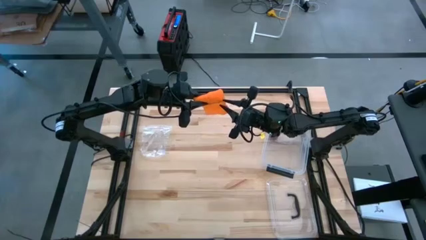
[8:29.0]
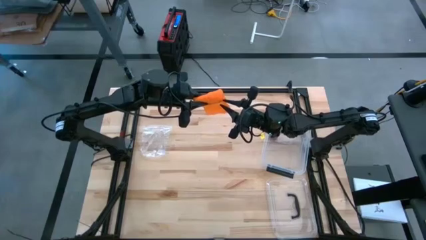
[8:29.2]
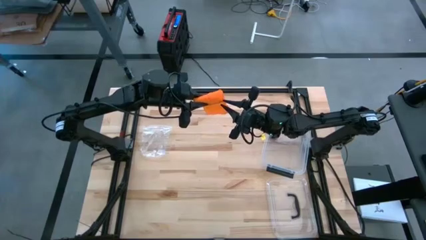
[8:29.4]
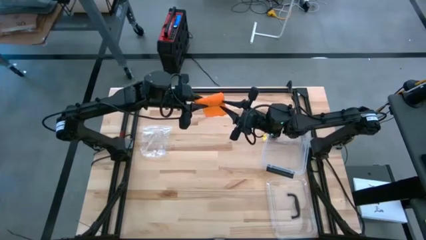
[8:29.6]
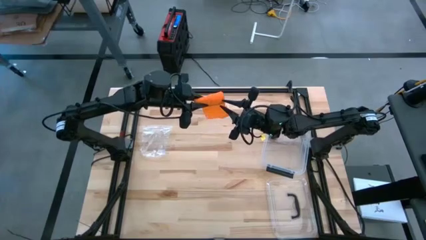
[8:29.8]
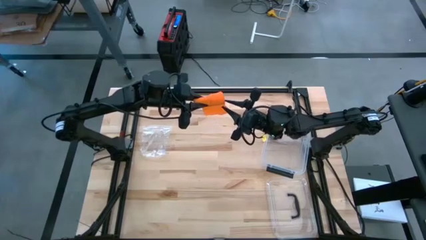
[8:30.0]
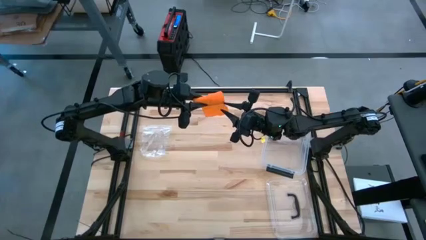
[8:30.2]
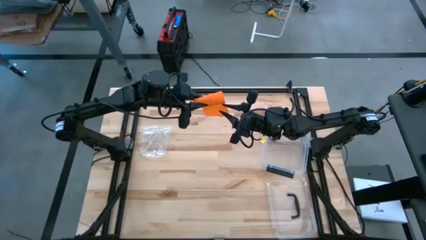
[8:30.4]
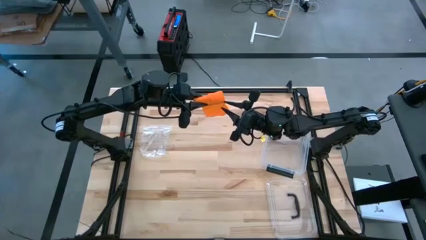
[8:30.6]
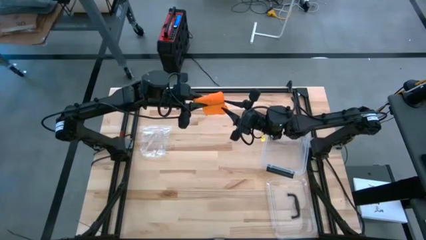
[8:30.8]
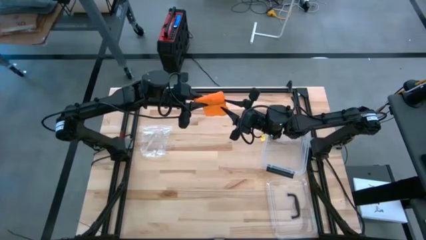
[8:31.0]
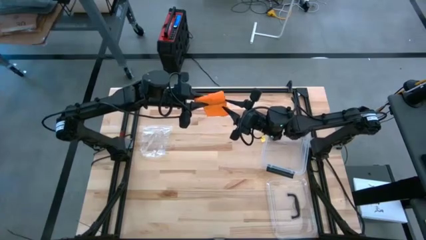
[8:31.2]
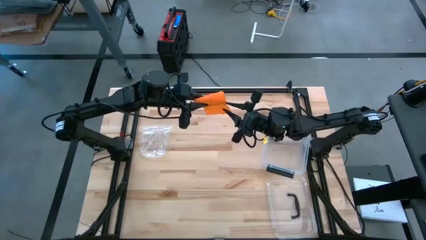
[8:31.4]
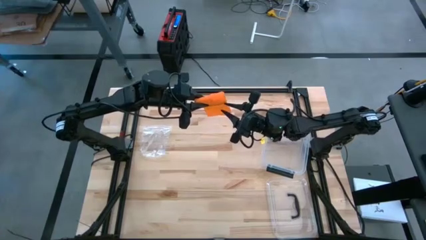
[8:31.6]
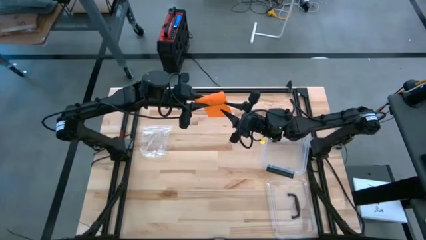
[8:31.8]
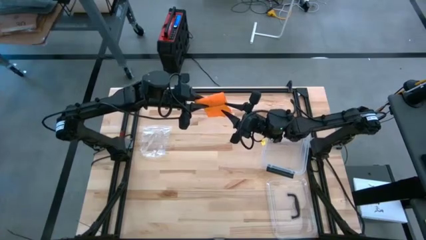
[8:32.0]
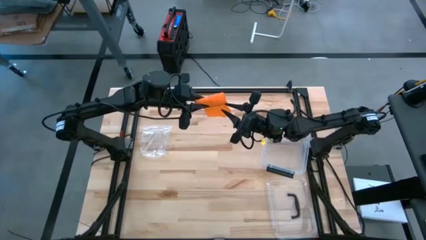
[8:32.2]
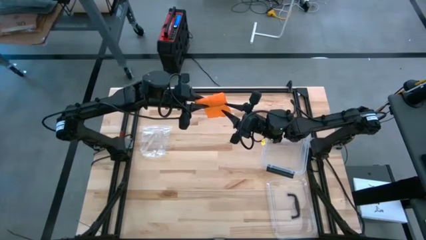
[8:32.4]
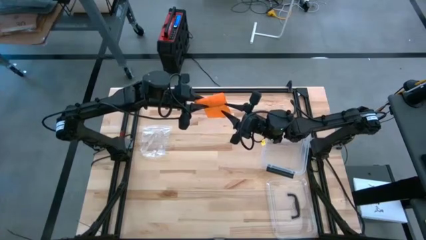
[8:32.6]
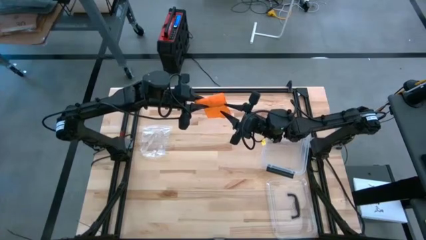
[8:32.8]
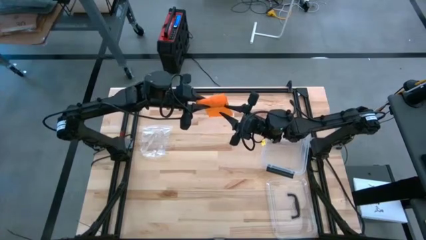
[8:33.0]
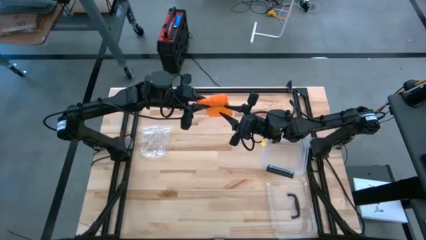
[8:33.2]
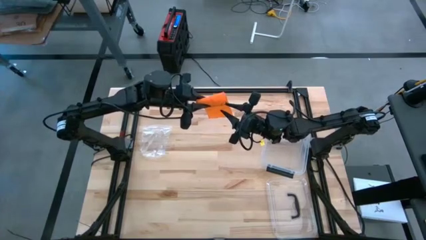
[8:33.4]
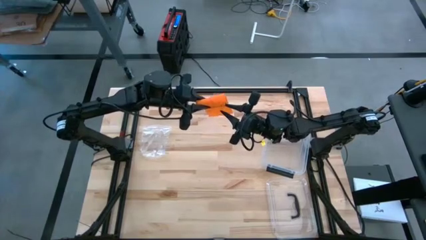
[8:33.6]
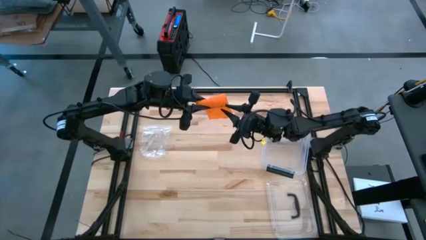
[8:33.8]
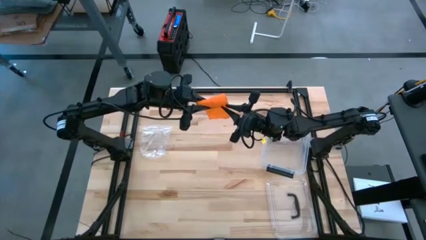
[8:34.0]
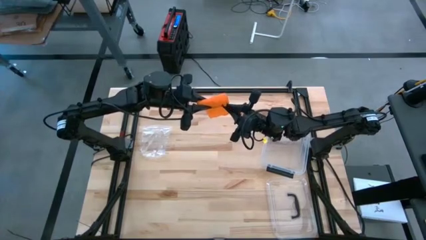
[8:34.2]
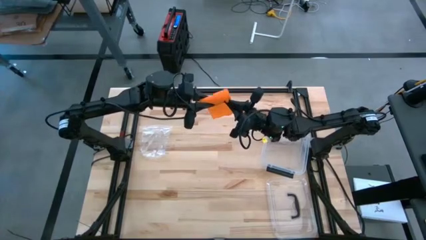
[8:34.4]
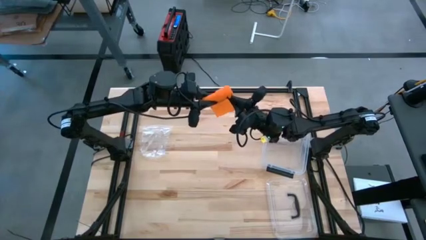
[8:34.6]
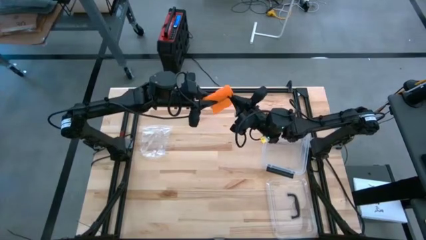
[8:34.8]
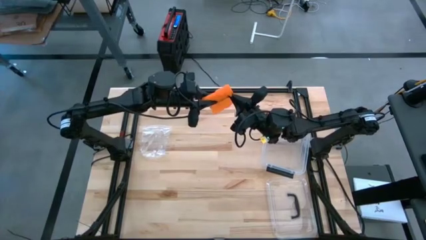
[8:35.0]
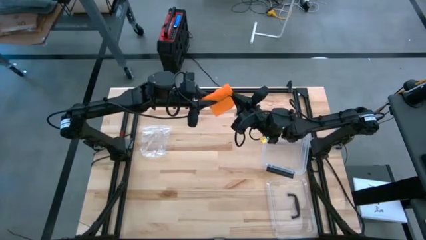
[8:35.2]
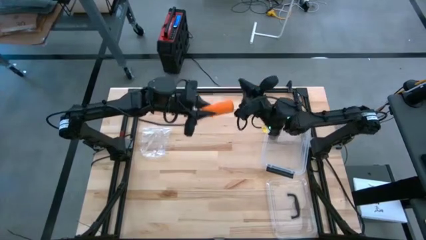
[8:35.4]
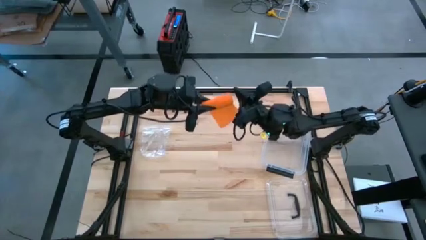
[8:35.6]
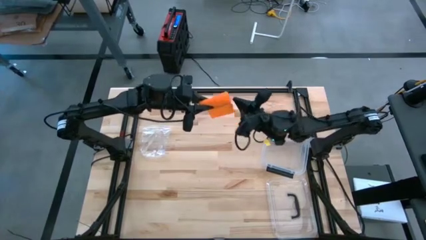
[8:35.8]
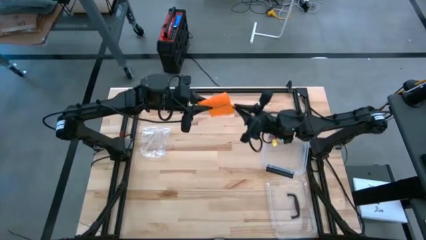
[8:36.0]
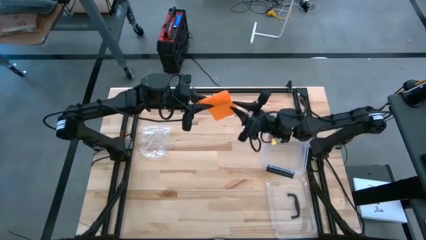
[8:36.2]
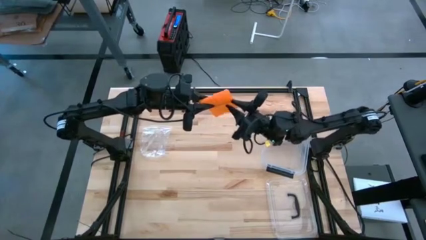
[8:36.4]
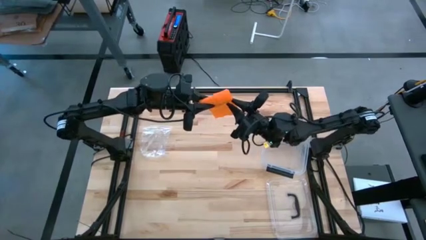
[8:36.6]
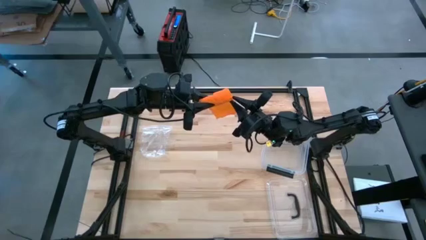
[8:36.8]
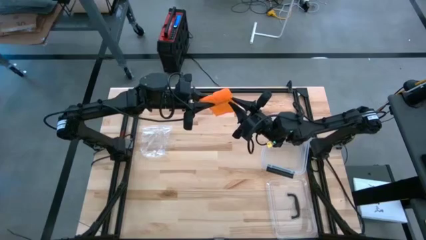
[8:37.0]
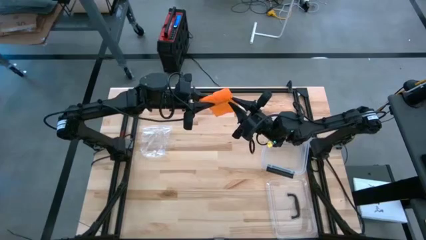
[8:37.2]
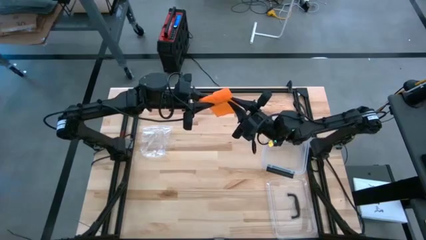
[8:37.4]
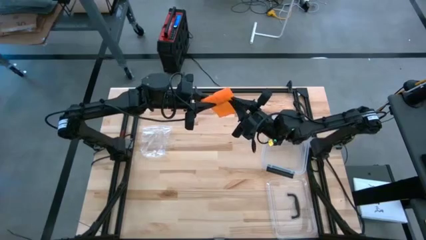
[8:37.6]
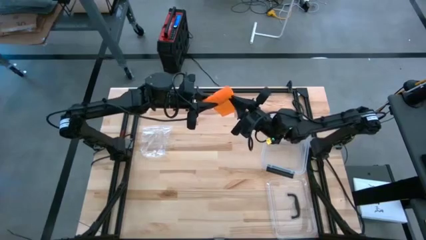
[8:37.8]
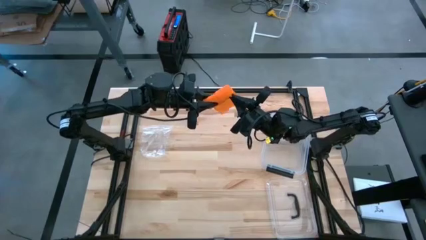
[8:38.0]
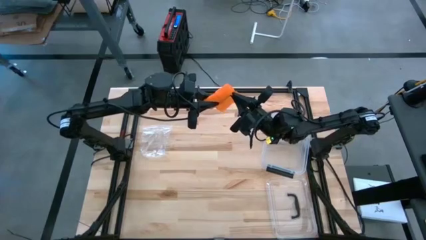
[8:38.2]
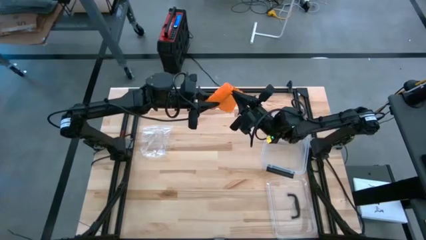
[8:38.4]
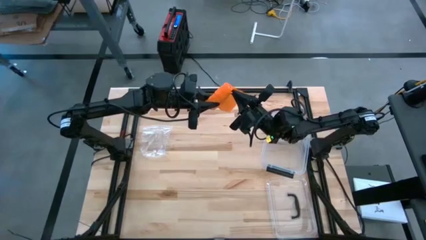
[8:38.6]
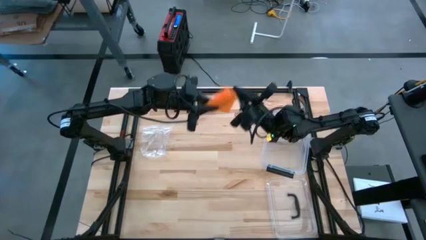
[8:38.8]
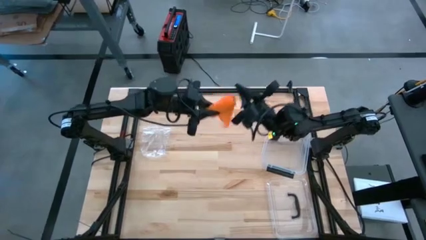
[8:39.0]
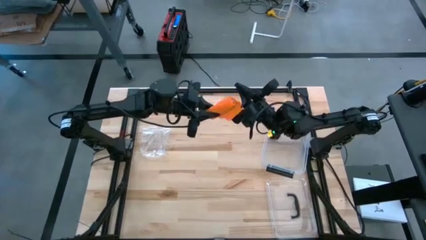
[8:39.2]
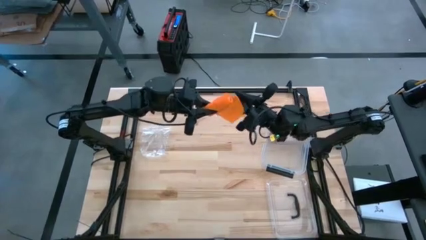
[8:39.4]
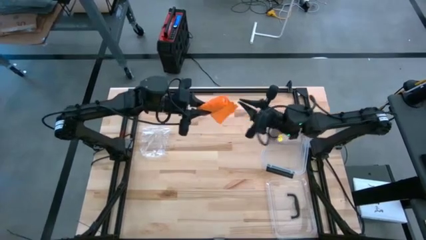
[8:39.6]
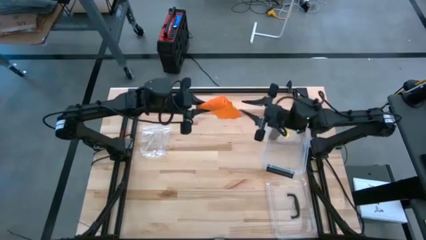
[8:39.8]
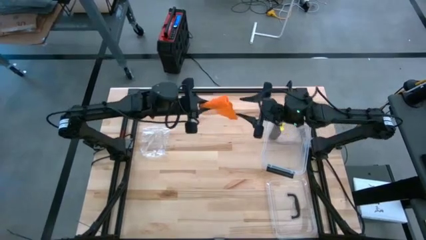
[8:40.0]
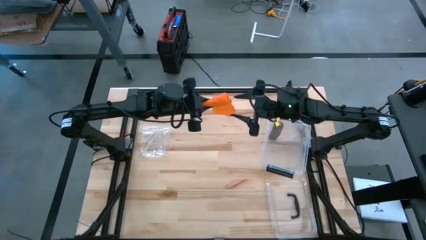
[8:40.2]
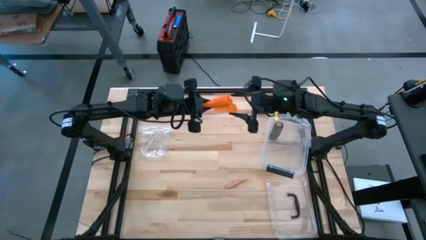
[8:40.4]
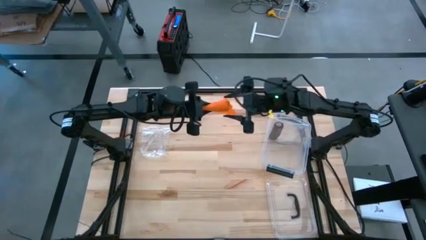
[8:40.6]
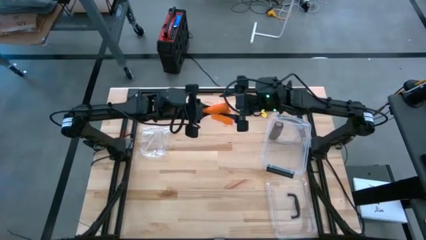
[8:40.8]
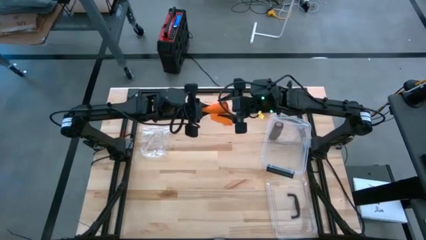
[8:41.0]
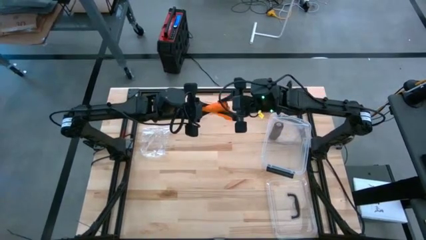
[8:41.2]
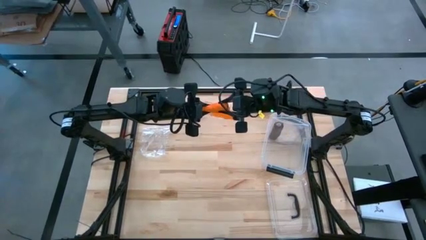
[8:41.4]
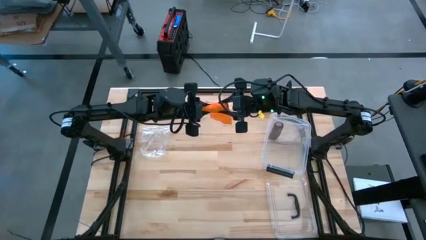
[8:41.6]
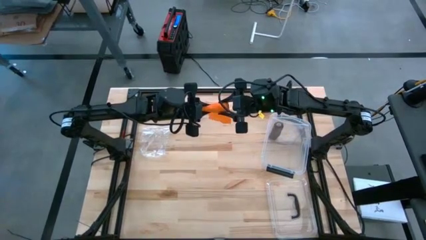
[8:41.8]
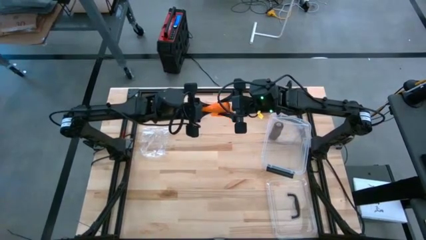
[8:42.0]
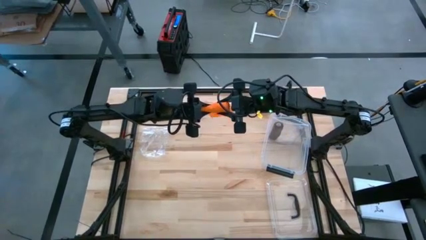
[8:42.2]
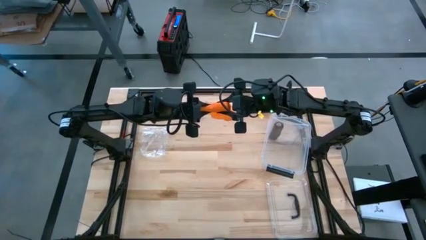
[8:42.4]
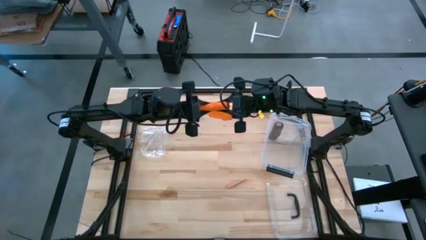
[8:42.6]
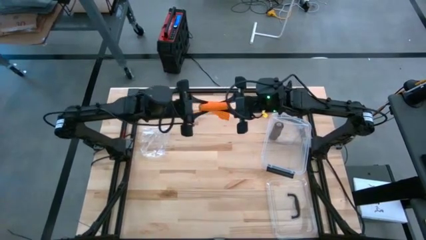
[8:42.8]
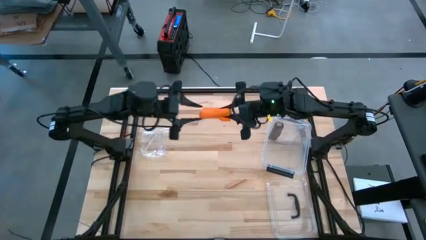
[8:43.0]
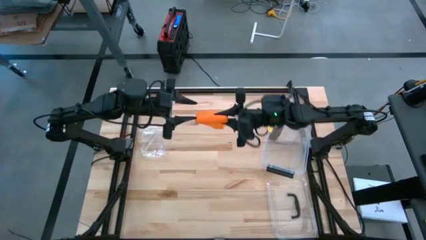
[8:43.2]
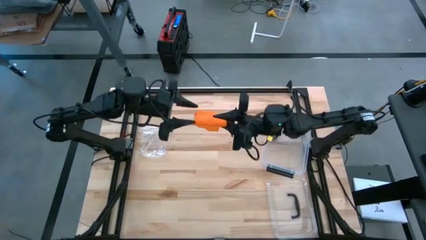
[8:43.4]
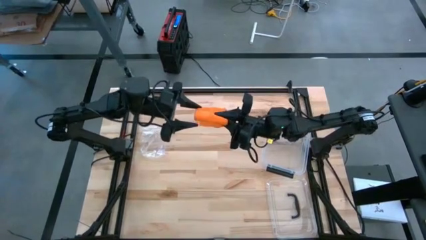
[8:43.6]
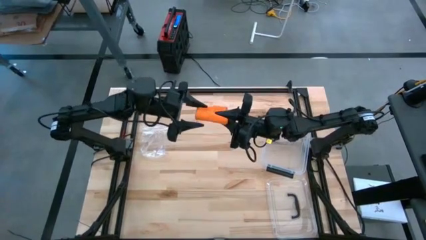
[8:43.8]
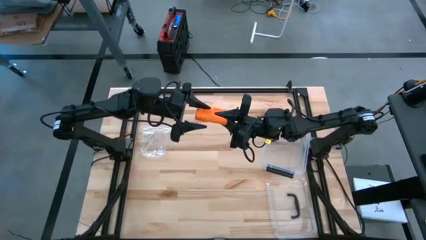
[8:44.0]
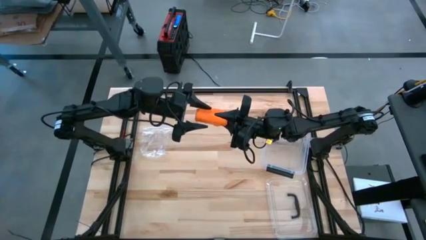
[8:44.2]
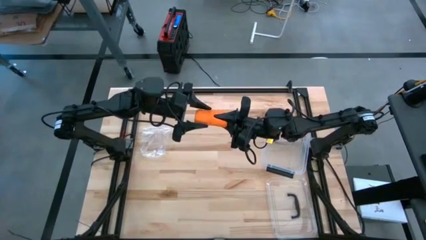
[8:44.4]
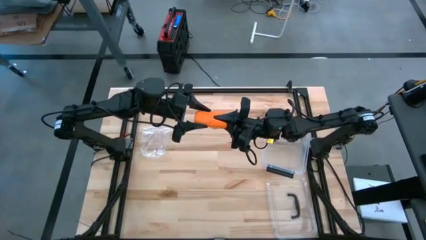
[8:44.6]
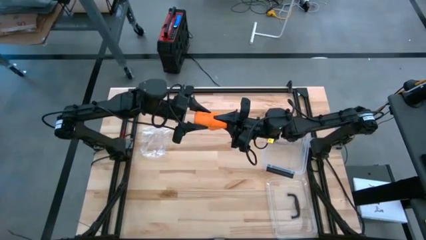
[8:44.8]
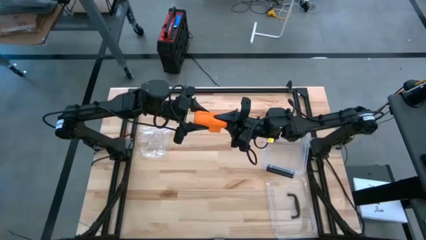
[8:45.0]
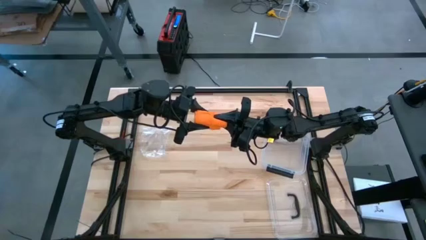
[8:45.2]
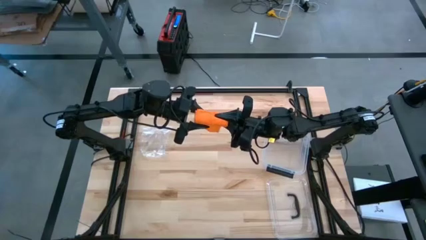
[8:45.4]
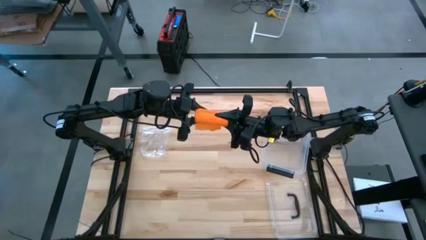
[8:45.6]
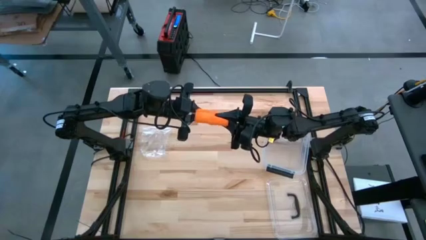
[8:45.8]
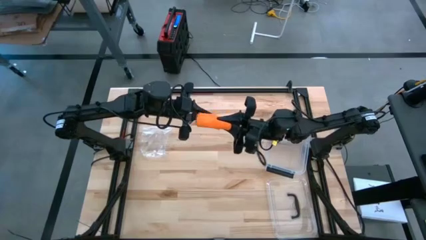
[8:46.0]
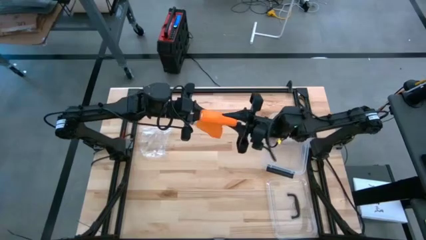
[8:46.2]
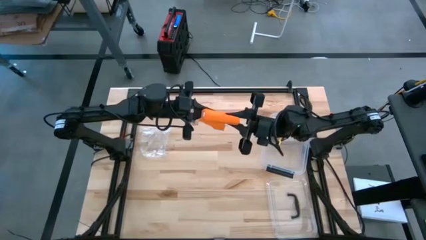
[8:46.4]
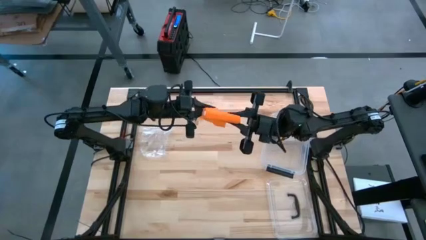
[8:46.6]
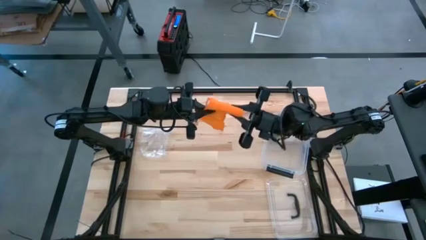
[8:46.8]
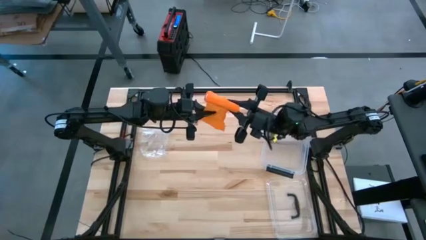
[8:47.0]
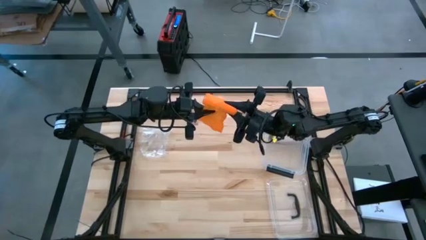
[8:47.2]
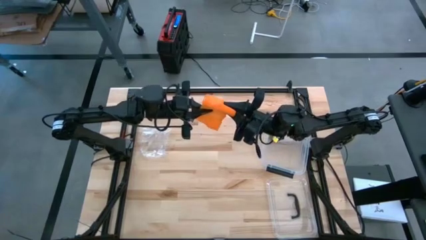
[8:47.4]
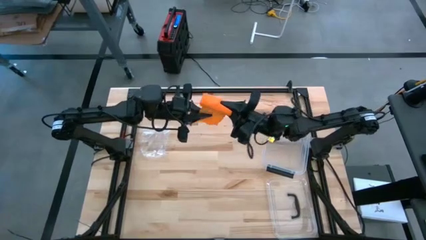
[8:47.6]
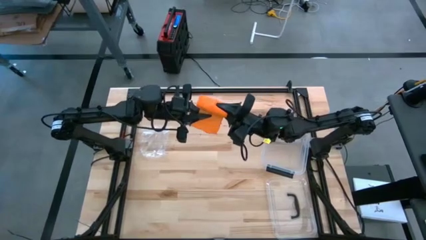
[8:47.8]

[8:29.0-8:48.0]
Task: Roll bandage
Roll the orange bandage
